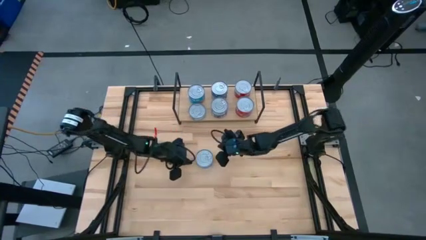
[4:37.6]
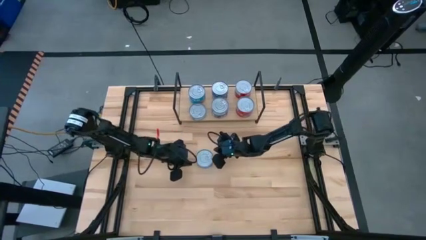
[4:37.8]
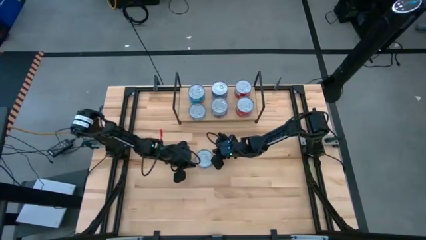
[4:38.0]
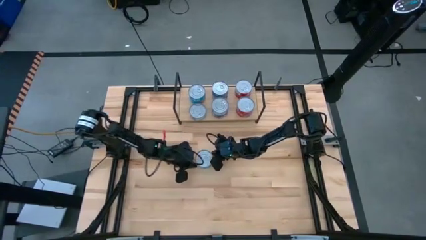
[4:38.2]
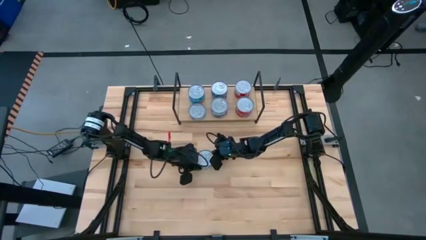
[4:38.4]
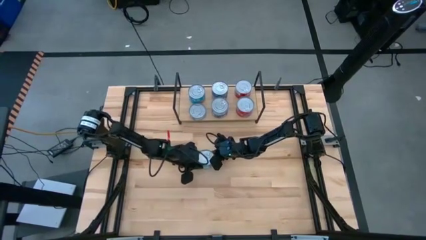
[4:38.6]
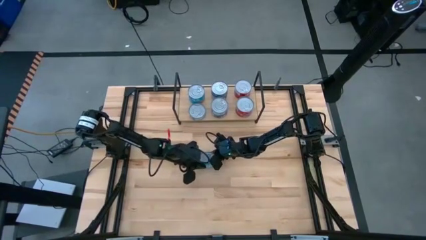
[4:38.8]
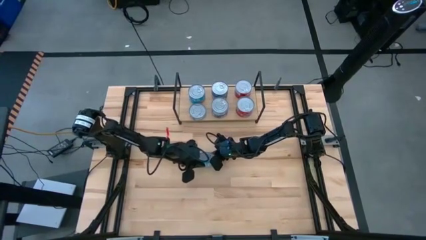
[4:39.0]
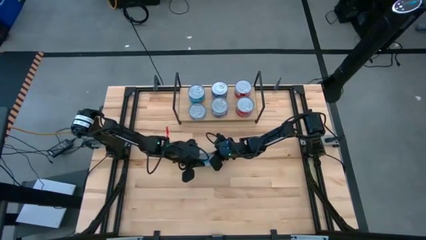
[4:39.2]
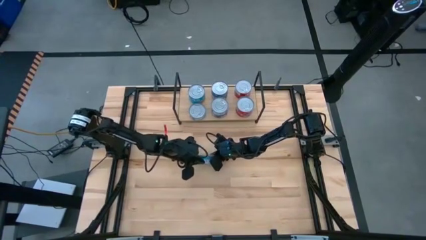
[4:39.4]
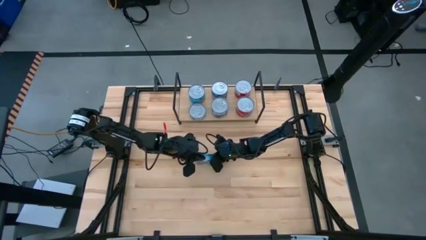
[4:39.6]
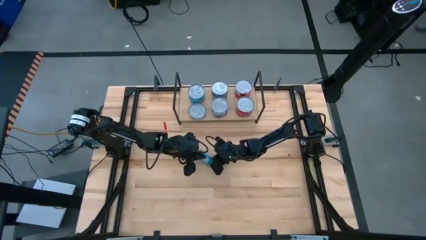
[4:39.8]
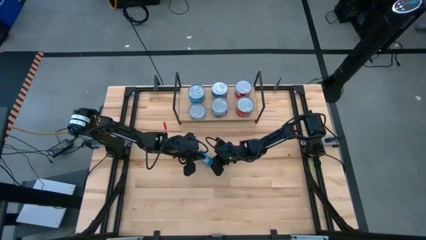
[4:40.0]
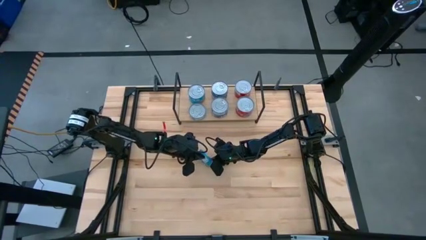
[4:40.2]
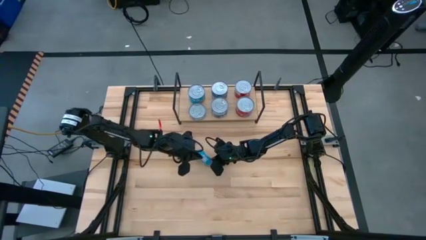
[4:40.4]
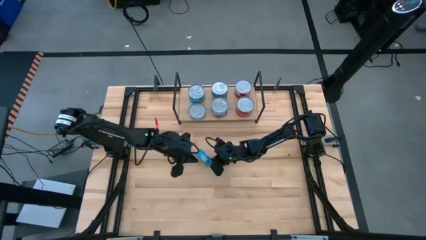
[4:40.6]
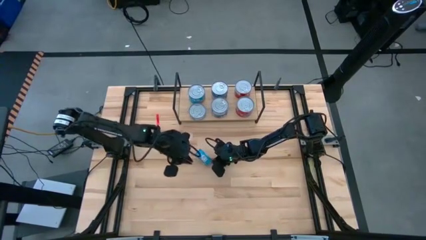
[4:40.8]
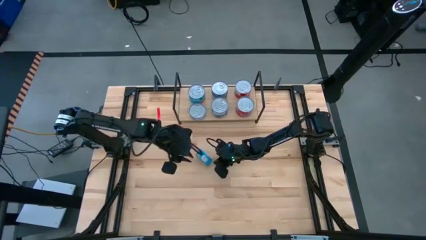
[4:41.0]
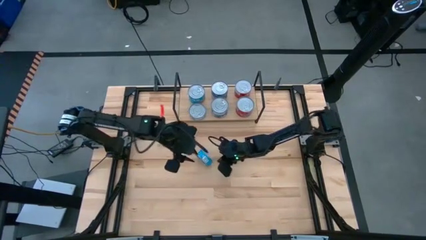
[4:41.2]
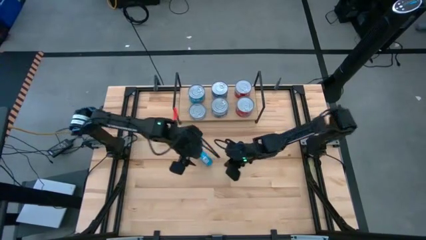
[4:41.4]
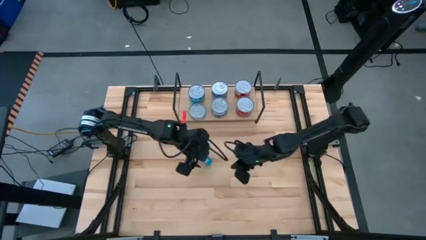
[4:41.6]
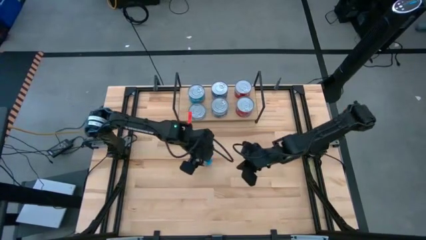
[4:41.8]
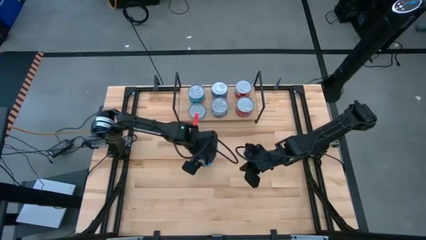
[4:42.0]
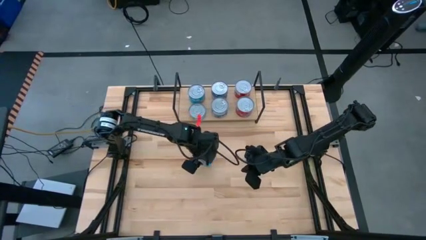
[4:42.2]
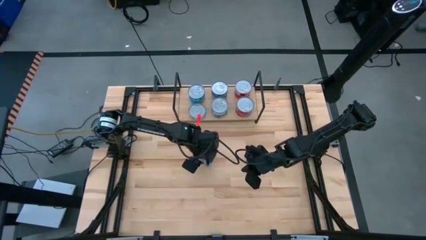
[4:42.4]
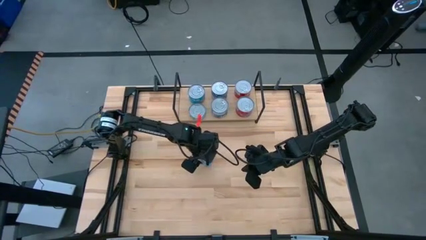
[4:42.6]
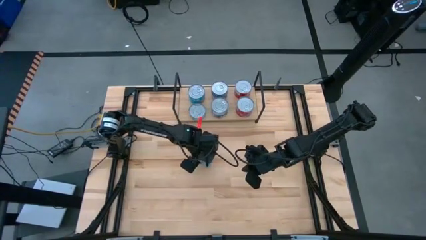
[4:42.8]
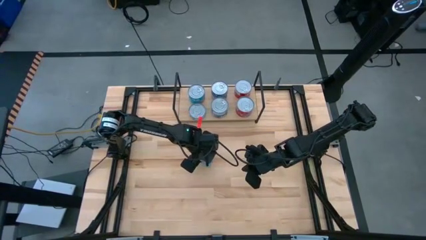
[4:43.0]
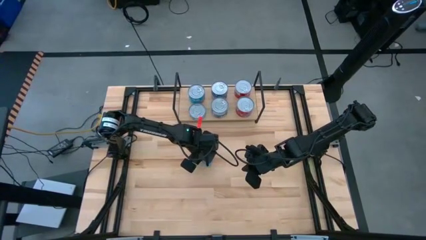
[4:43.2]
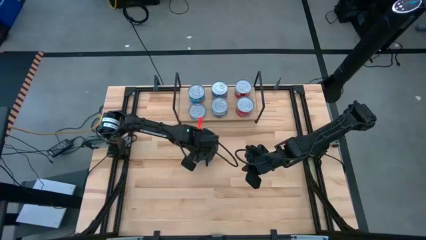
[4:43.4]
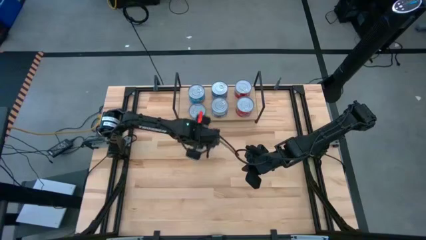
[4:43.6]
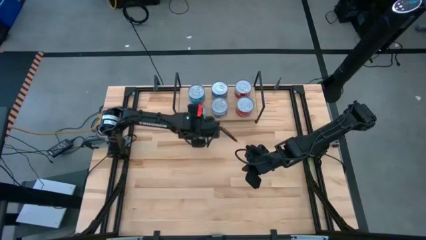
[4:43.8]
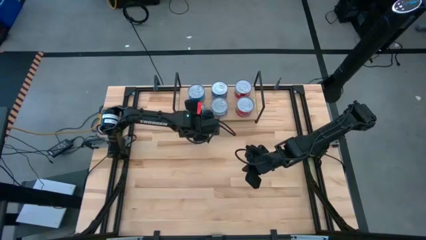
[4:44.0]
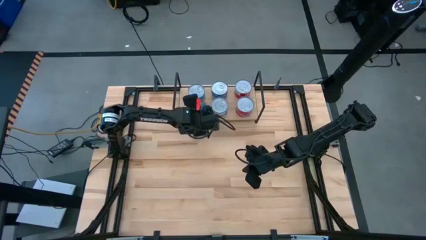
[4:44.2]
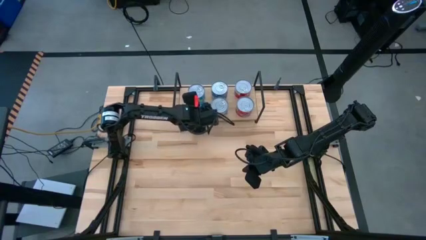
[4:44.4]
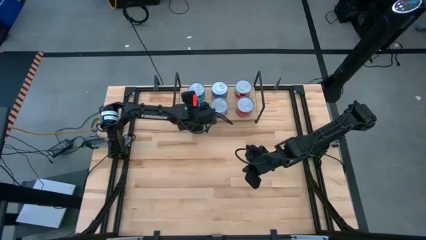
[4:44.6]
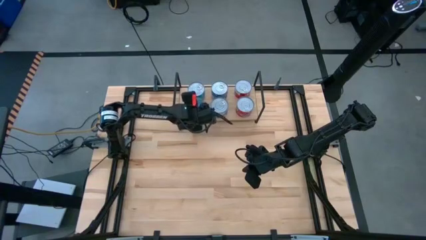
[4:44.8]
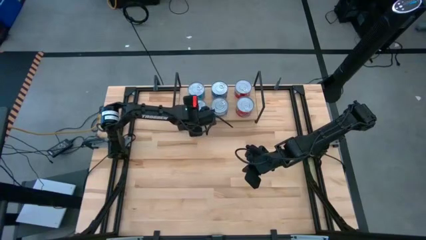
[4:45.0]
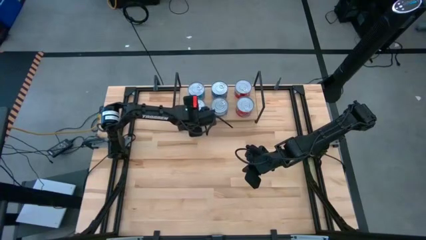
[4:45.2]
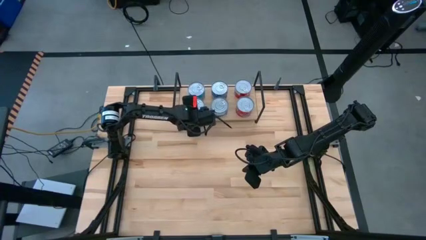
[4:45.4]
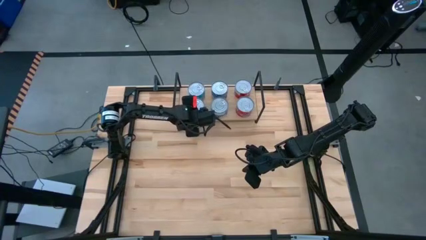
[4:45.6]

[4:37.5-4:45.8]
Task: Stack canned seafood by type on shelf
Stack the center light blue tuna can on top of the other light blue tuna can on the shelf

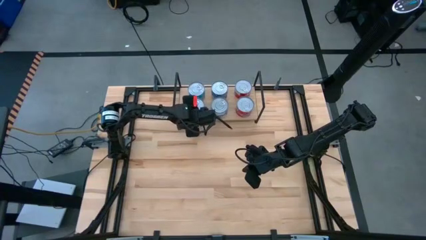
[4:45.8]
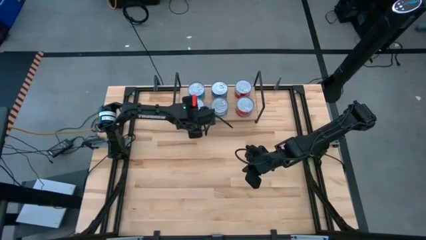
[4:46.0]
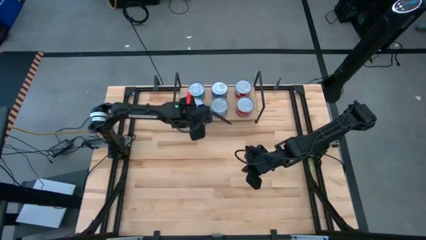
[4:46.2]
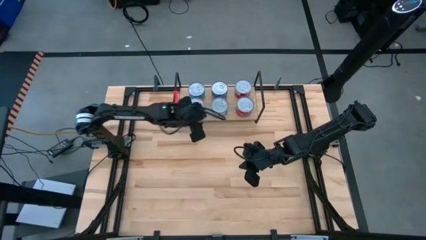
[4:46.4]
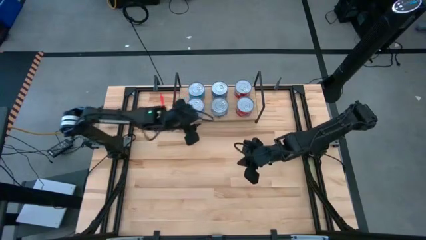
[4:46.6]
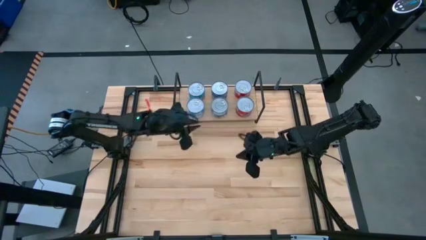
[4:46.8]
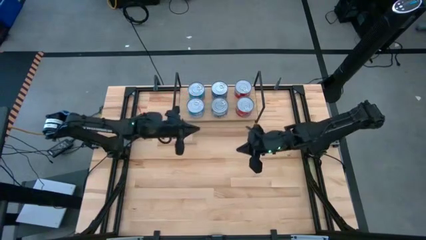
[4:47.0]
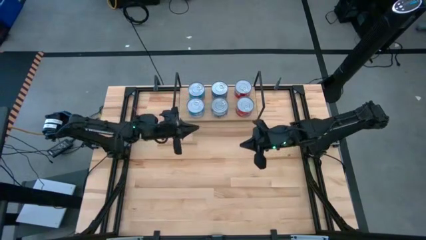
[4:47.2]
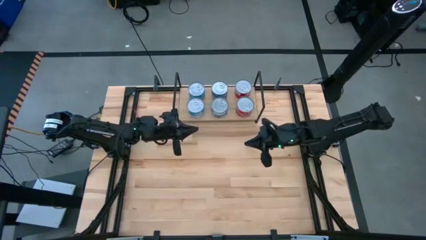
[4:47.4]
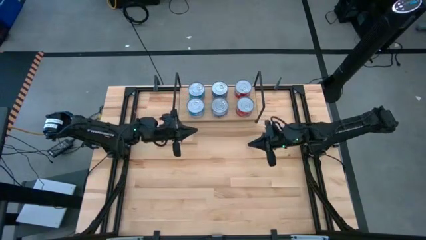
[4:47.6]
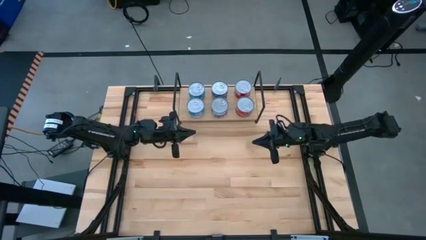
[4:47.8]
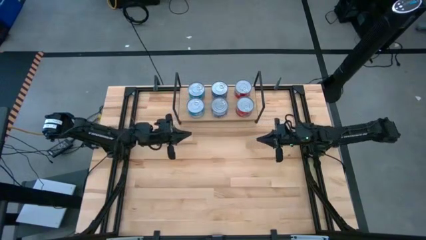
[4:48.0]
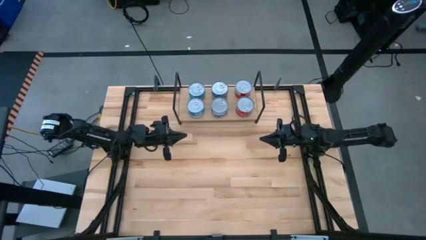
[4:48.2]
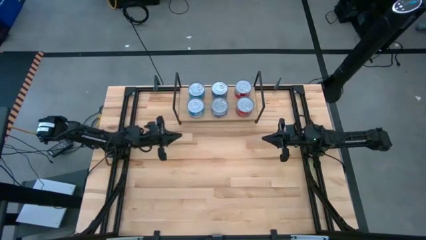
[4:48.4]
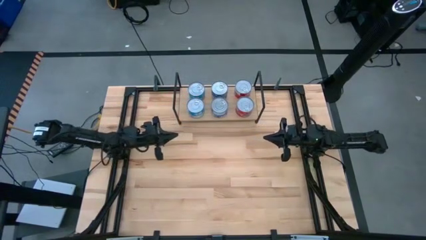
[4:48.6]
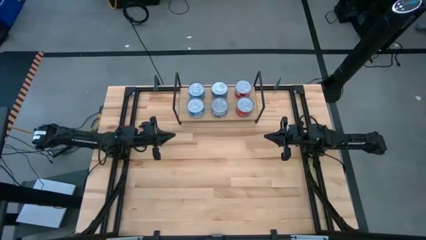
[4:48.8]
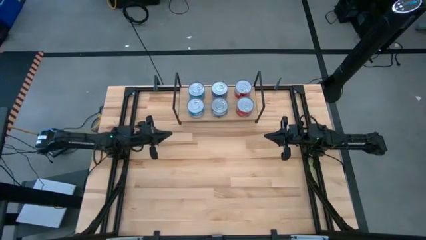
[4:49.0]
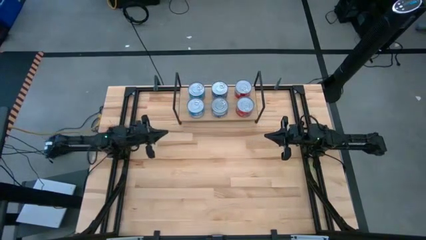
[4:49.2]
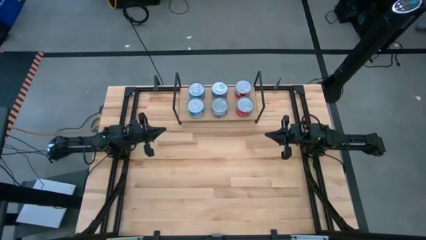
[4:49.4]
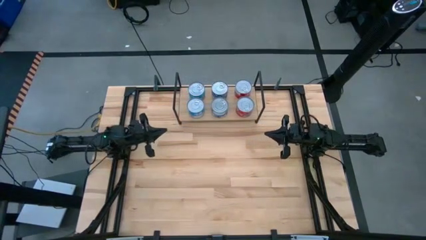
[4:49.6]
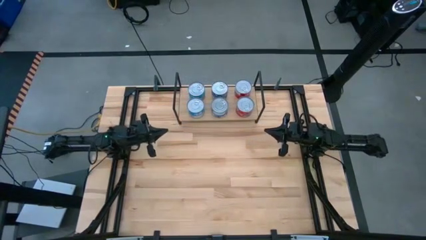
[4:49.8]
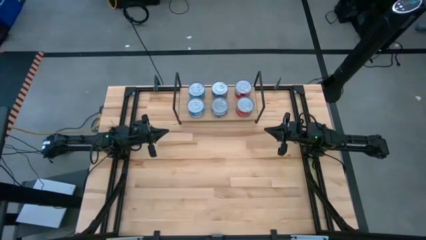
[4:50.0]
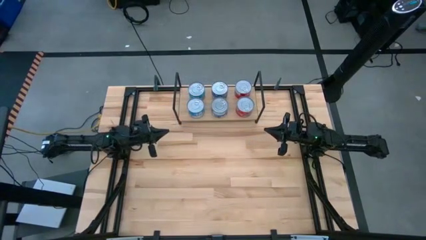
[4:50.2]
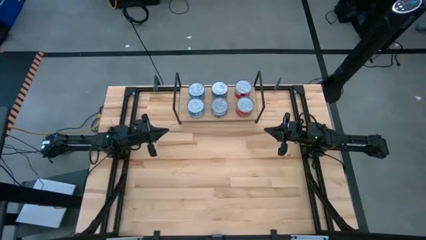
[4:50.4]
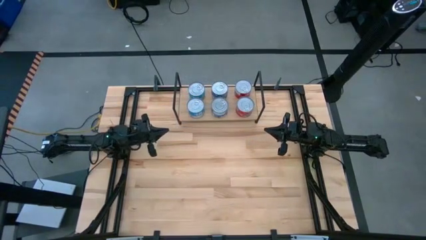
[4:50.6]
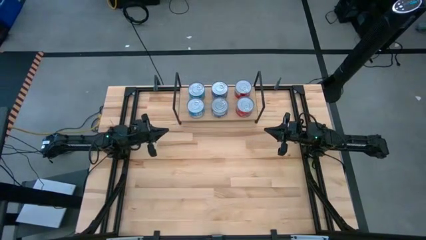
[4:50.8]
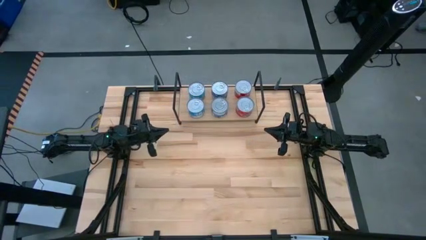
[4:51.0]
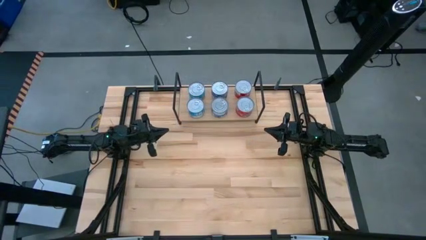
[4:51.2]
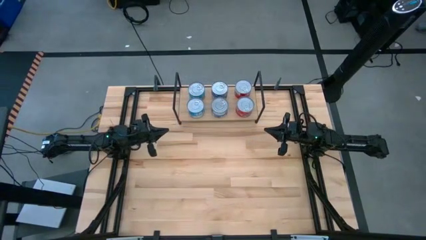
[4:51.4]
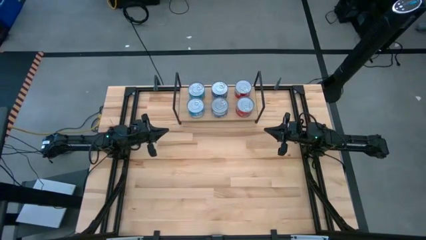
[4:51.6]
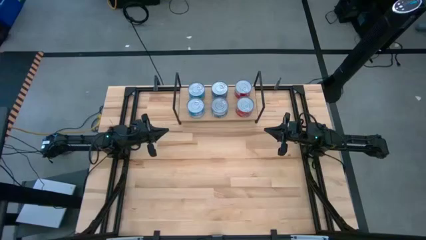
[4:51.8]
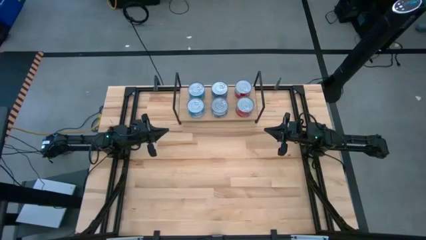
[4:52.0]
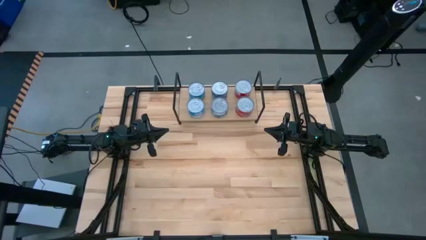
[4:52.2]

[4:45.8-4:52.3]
Return to Home Position
